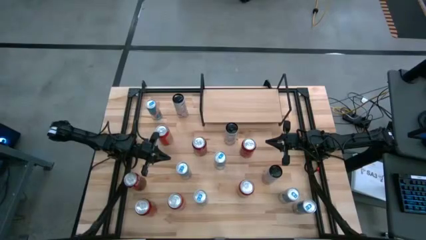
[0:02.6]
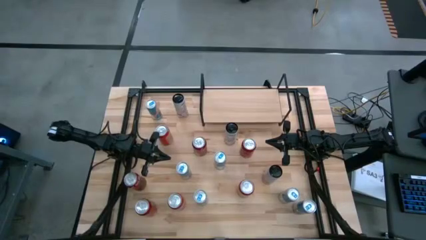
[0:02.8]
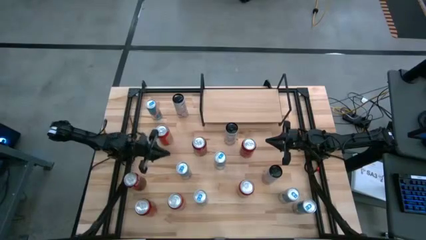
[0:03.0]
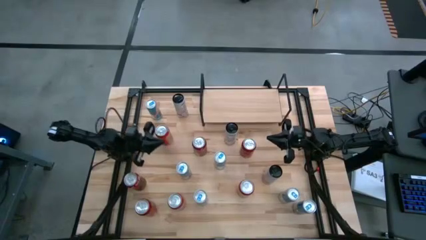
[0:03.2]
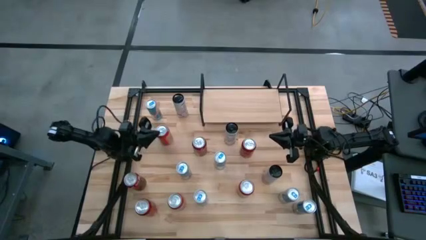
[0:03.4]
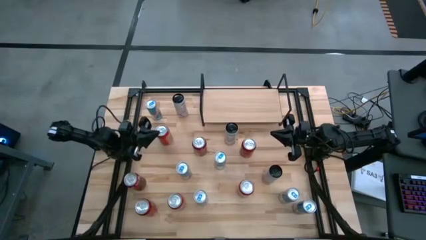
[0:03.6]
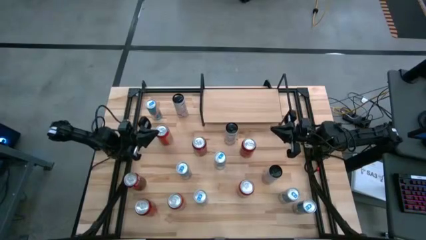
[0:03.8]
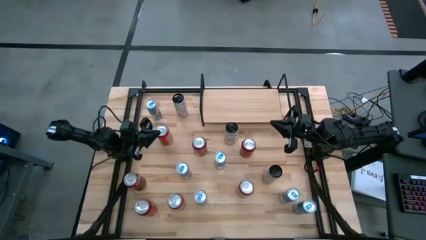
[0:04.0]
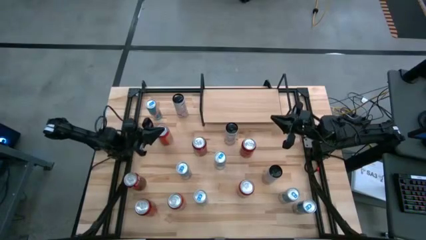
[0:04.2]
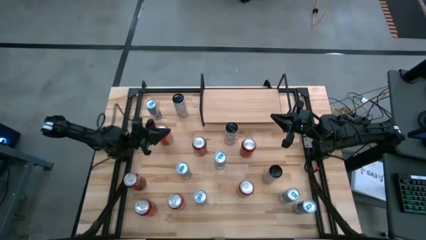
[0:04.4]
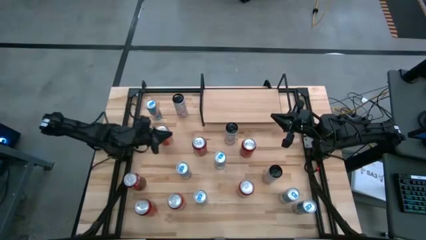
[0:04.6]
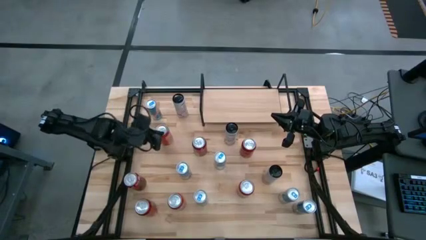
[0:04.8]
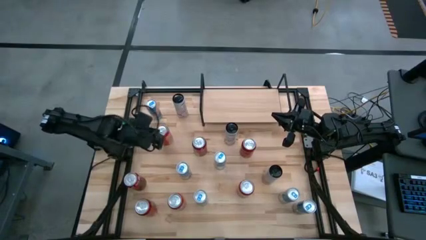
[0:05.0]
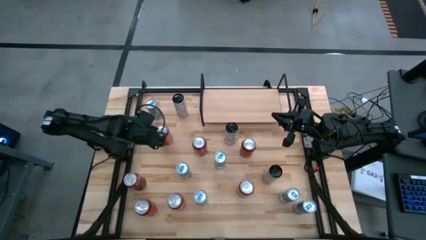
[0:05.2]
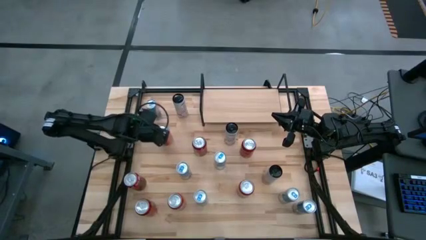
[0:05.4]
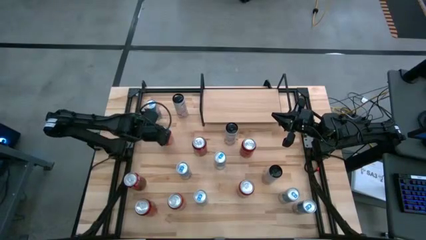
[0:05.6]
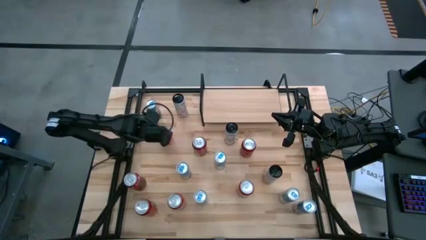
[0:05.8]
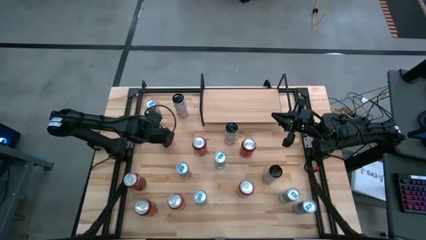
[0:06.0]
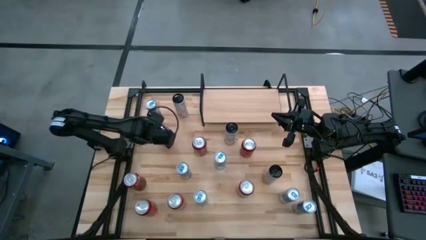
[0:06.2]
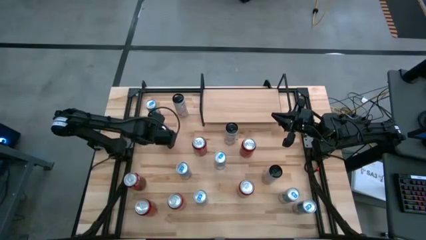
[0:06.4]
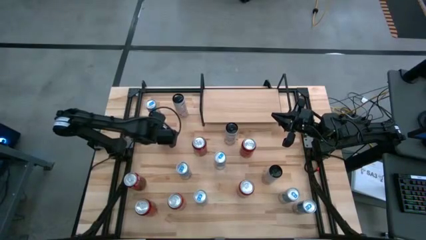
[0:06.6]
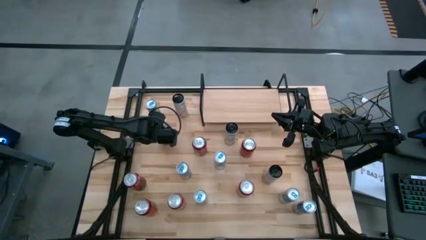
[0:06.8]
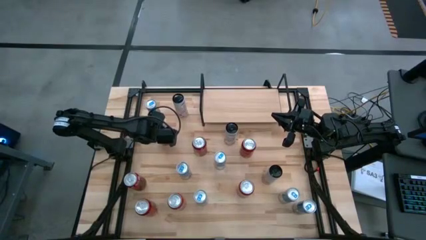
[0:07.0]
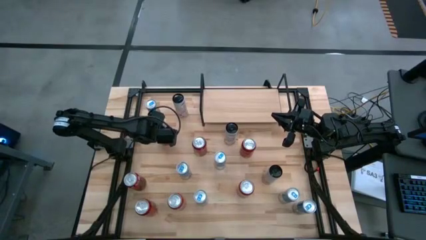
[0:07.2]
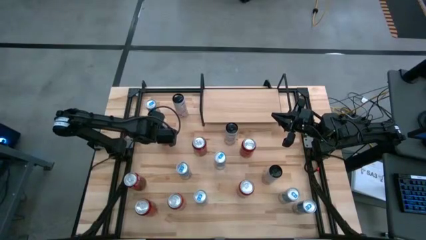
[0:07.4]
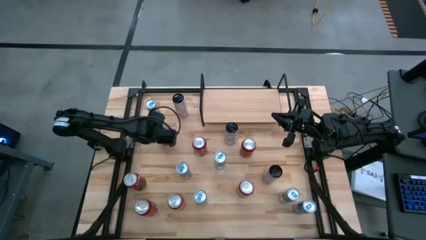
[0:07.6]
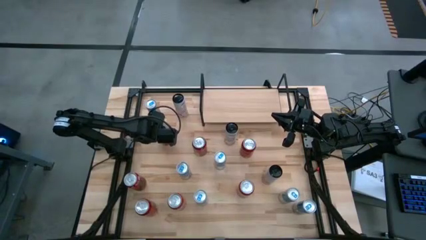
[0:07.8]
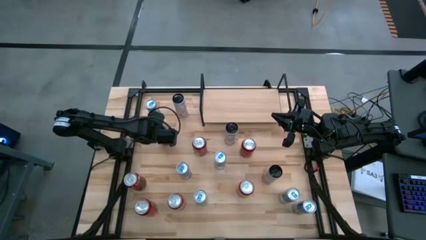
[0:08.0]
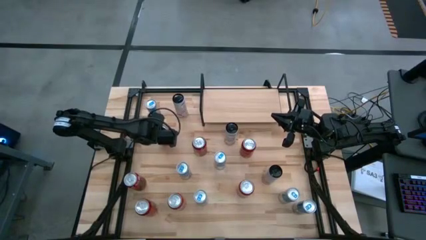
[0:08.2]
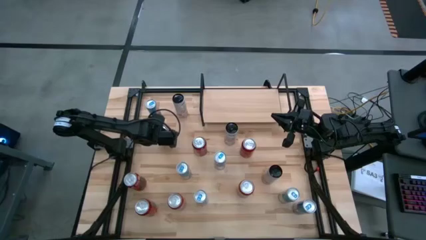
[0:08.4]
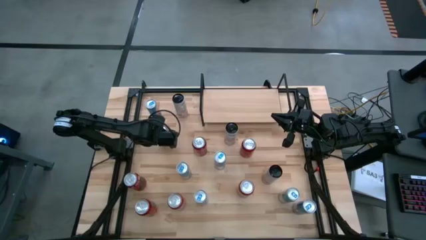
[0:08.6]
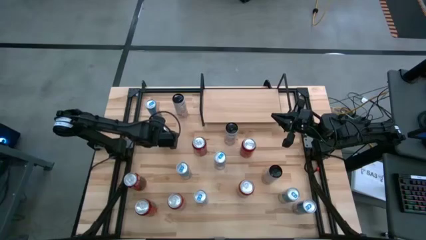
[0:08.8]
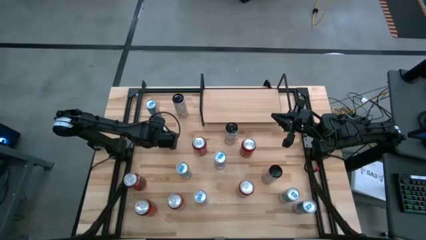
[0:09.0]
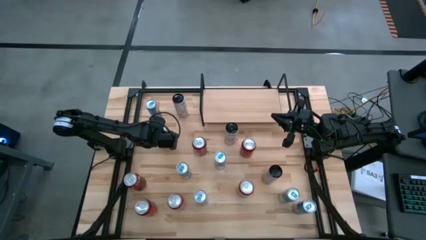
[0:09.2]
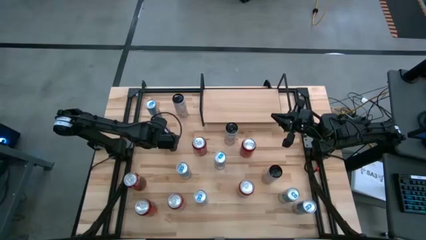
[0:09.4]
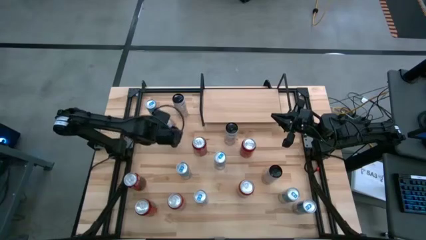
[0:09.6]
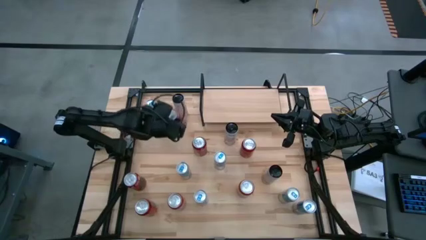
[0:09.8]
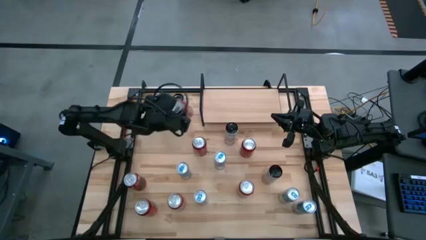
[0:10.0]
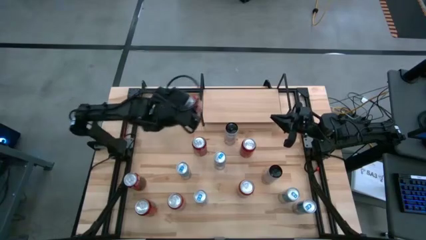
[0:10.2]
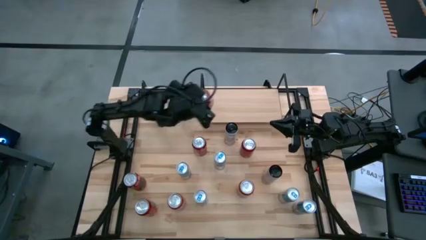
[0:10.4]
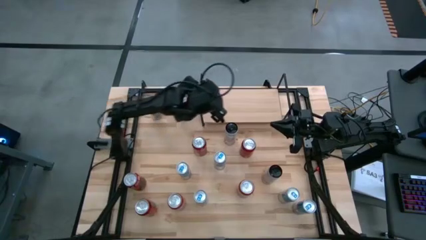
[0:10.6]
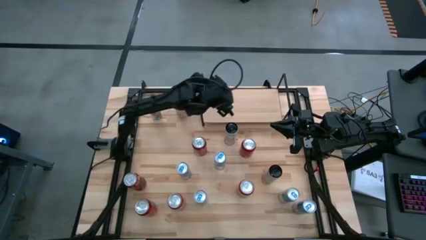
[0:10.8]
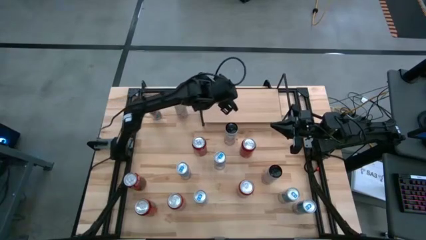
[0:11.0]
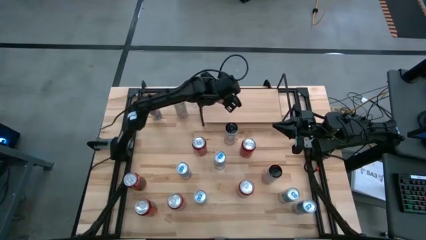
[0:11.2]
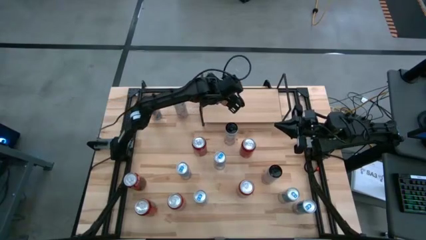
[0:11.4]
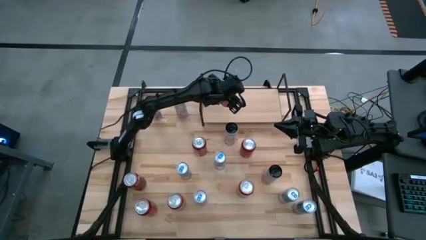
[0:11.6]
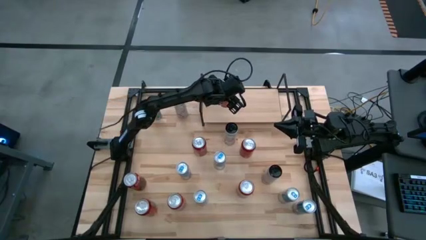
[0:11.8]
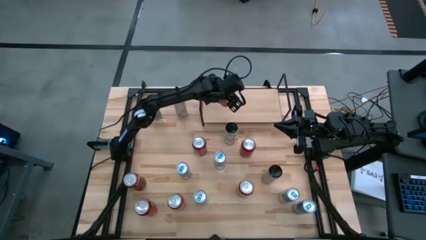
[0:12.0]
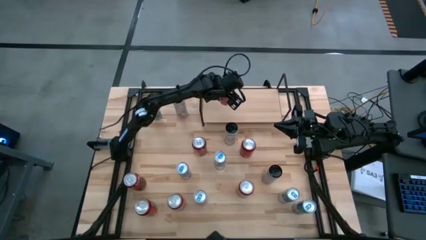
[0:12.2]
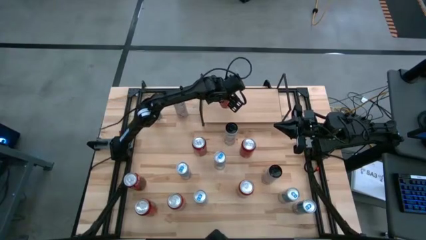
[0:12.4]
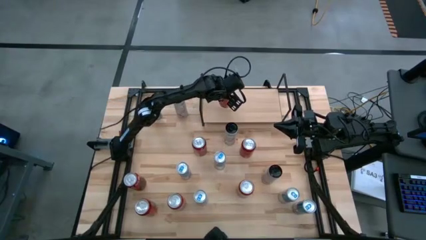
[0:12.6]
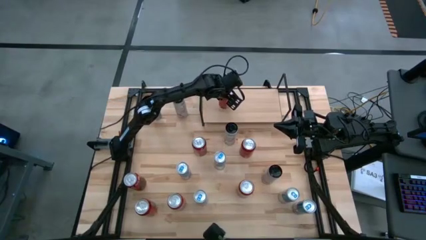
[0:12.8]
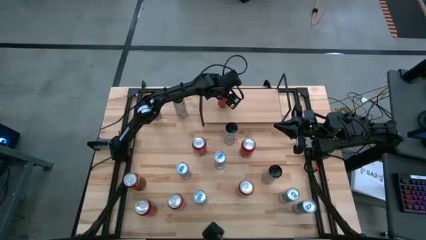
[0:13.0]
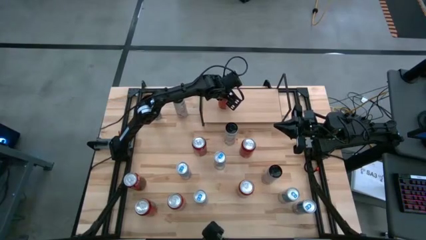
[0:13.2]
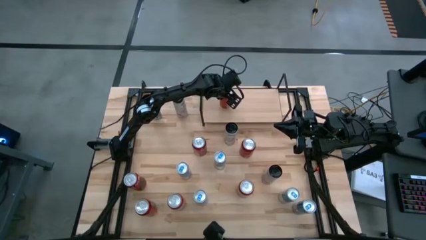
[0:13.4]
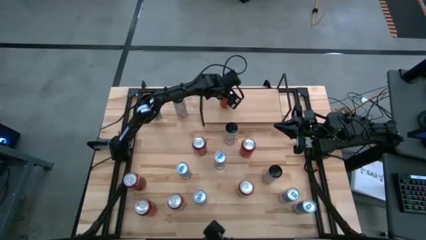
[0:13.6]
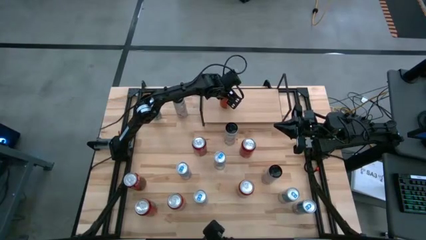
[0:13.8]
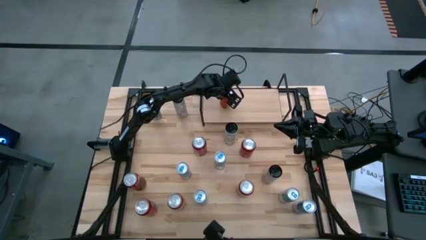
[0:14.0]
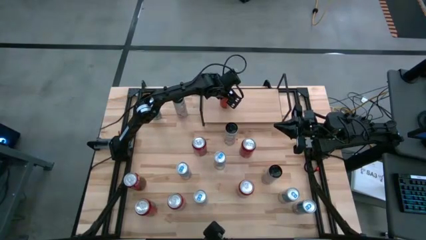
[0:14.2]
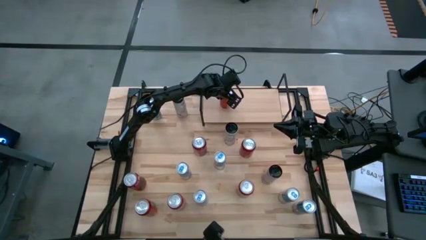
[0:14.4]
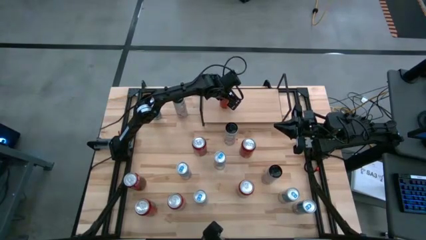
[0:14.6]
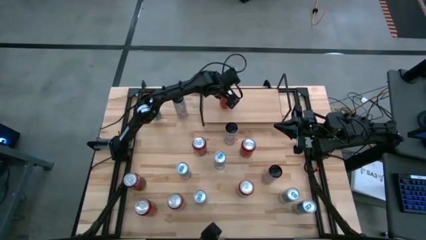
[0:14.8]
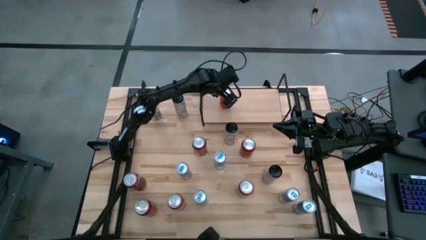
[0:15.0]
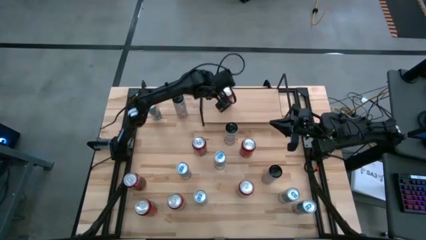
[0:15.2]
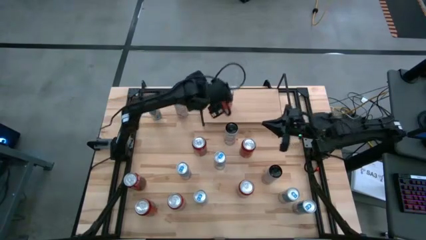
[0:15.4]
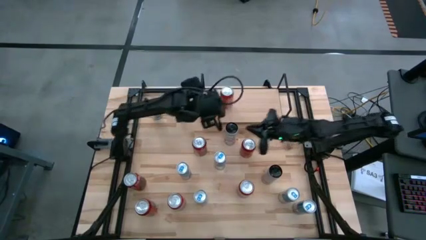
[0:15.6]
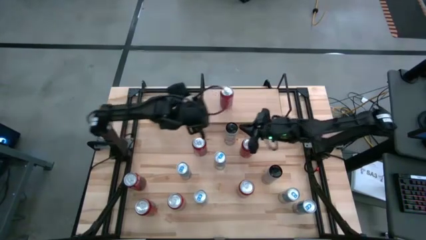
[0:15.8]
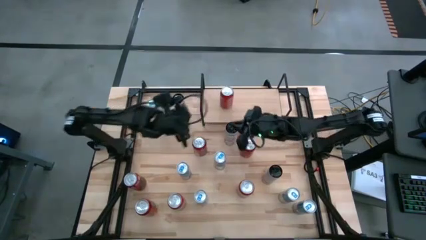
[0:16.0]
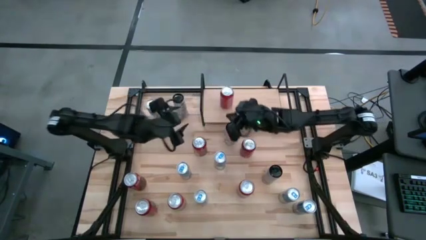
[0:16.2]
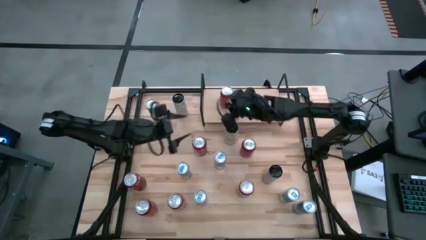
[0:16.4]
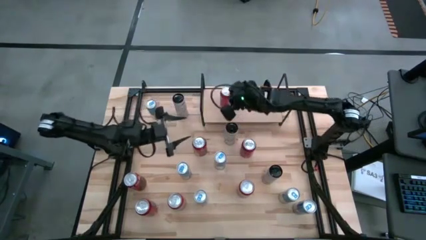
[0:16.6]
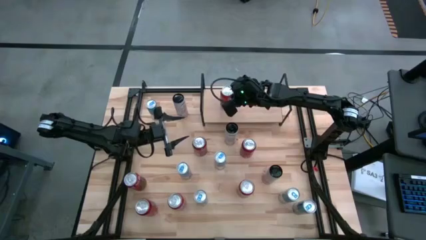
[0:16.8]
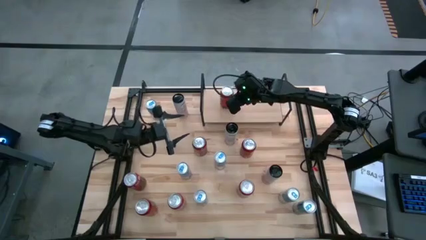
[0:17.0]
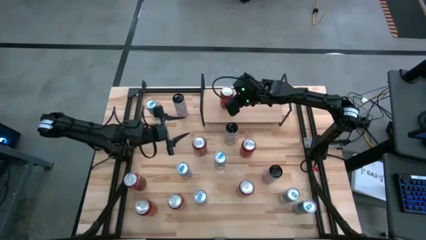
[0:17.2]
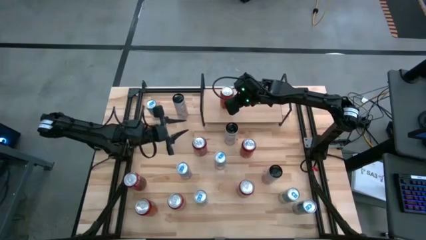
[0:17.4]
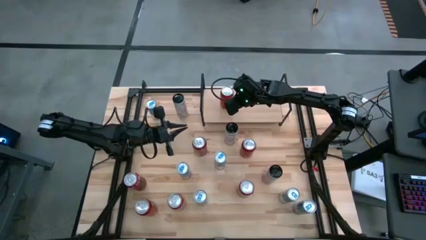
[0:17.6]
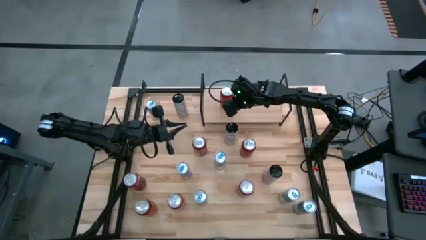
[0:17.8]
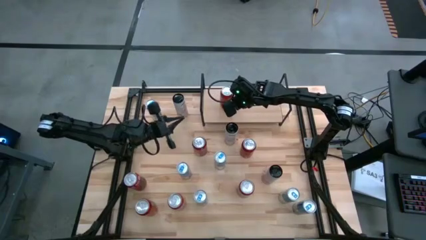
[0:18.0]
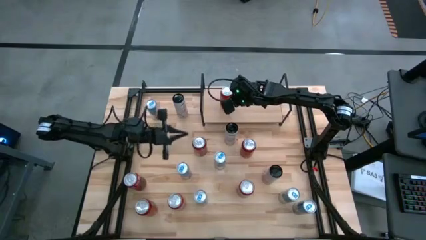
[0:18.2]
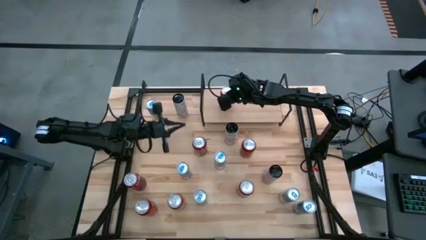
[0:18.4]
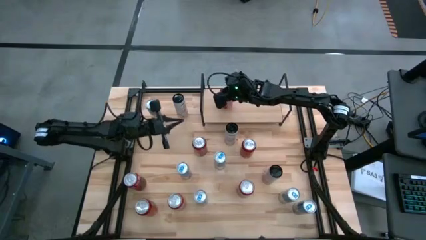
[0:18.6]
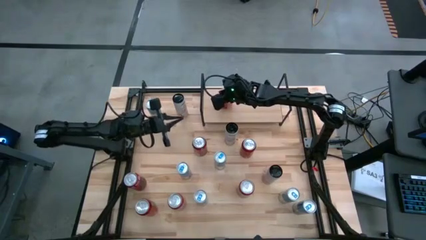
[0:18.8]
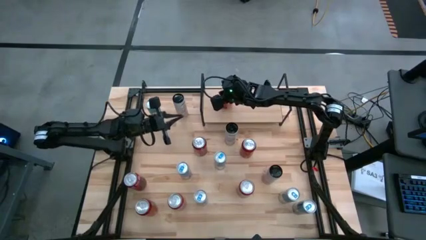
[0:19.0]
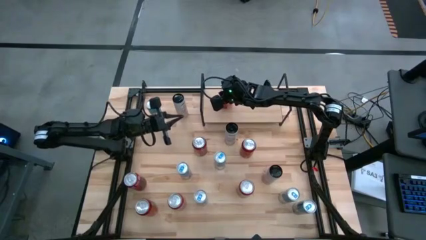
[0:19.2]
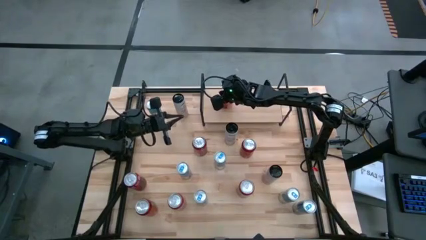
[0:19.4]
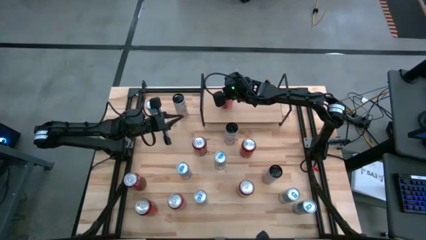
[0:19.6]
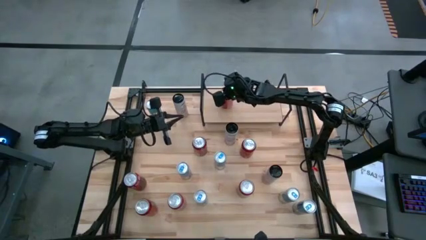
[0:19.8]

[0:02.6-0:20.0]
Task: Place canned beverage on shelf
Put the orange soda can on the shelf
